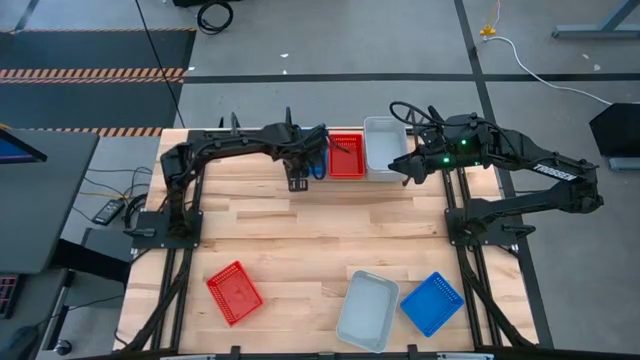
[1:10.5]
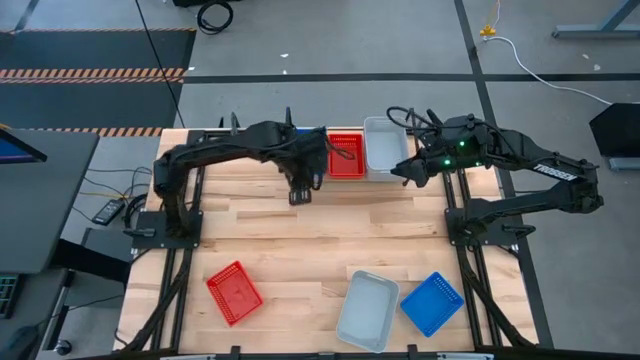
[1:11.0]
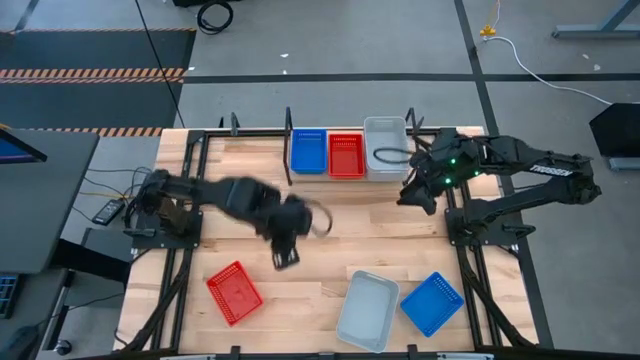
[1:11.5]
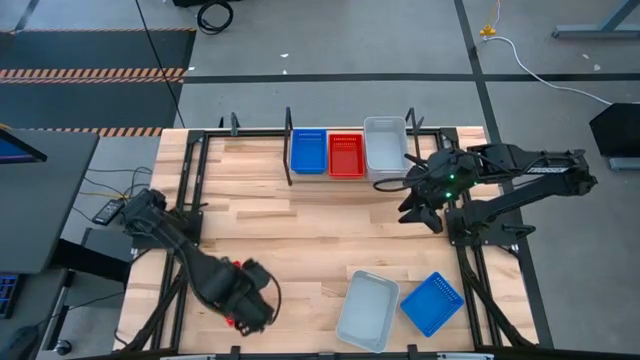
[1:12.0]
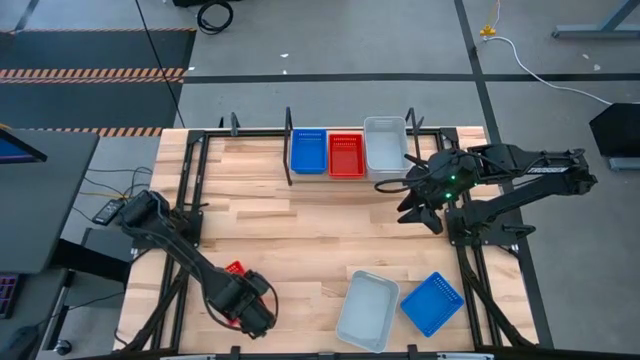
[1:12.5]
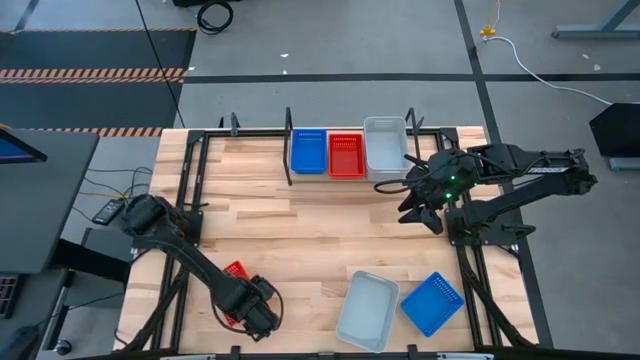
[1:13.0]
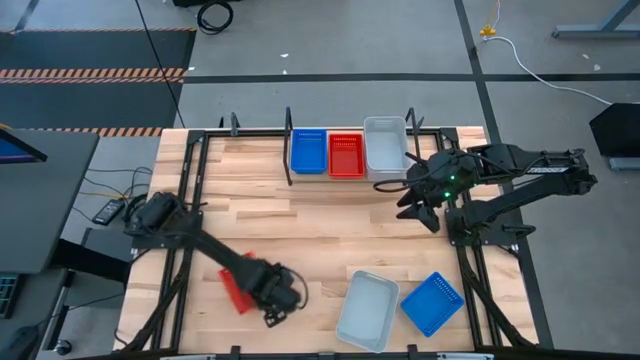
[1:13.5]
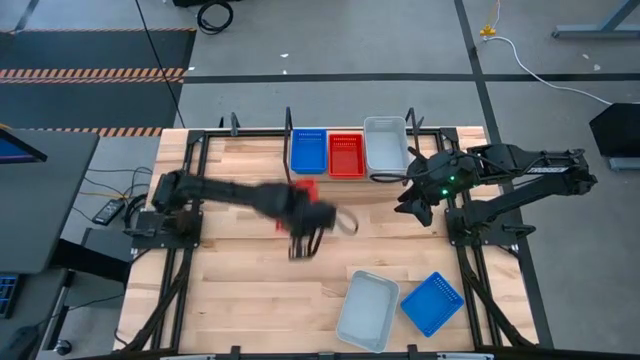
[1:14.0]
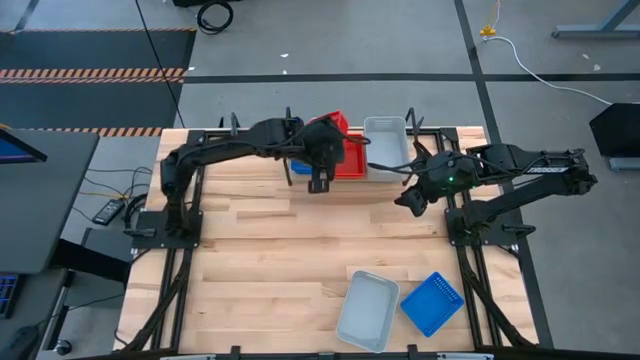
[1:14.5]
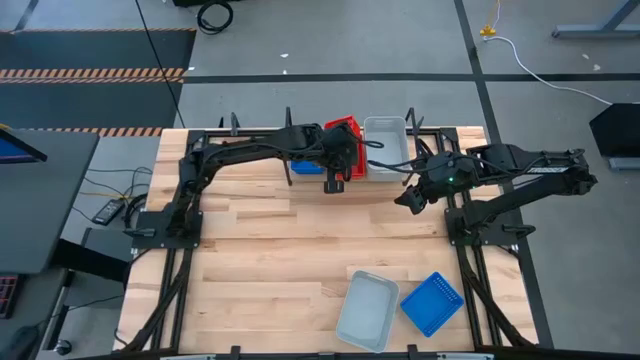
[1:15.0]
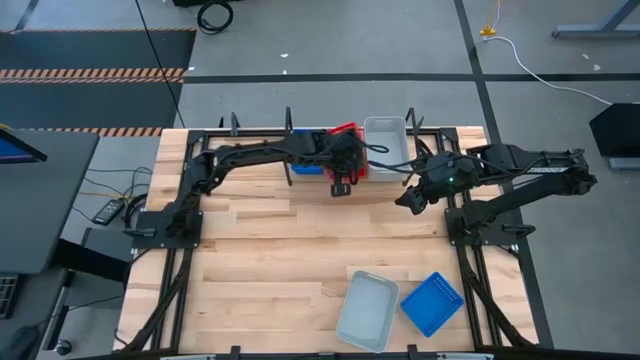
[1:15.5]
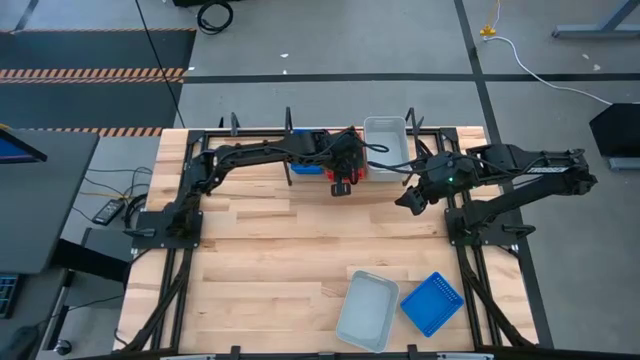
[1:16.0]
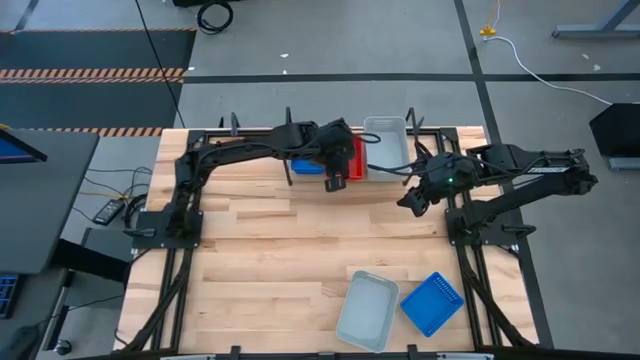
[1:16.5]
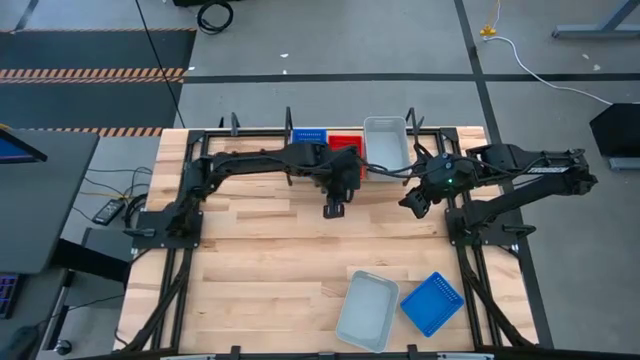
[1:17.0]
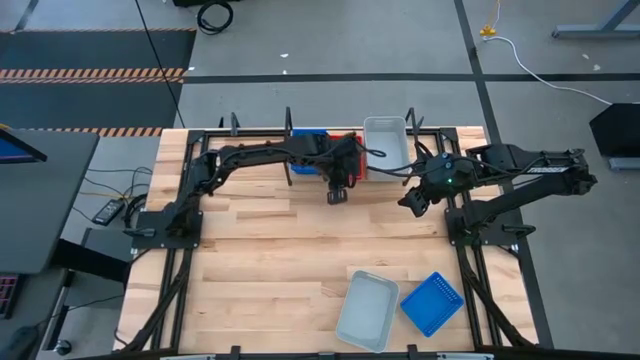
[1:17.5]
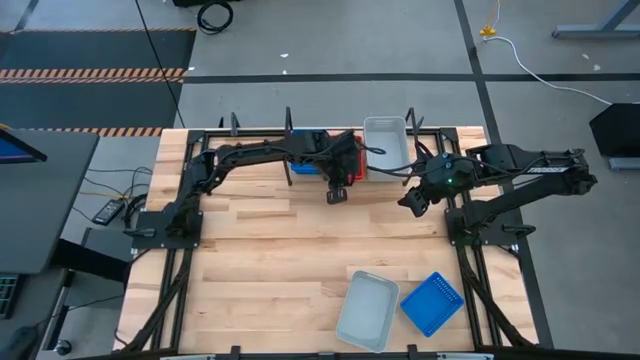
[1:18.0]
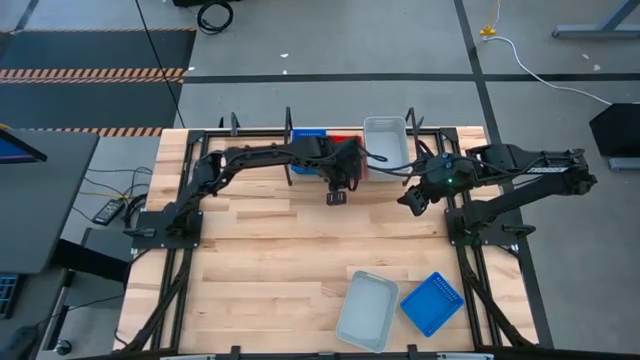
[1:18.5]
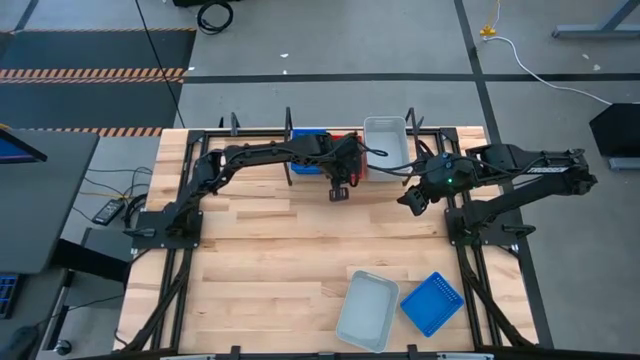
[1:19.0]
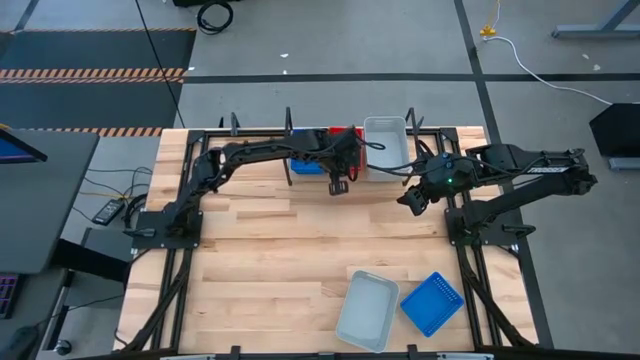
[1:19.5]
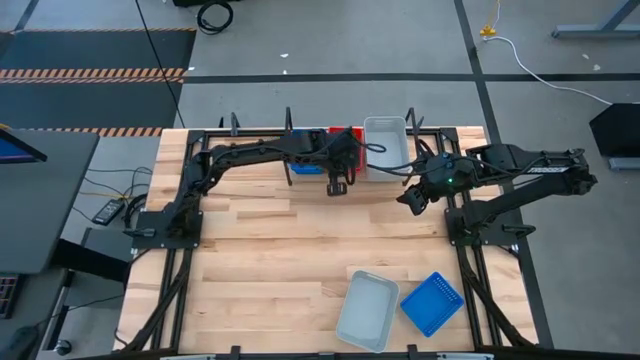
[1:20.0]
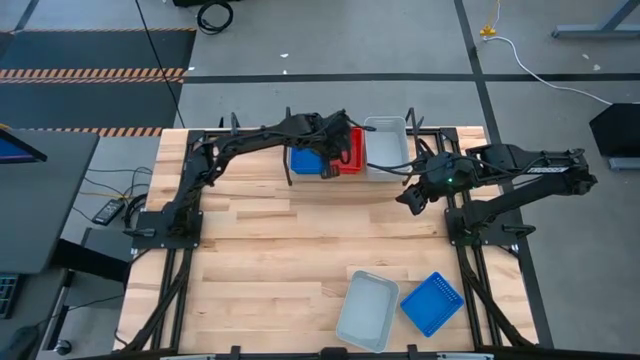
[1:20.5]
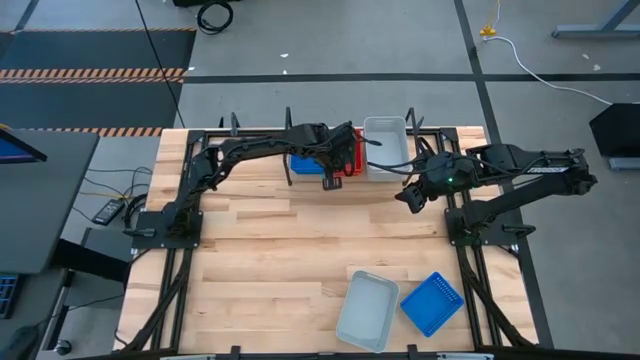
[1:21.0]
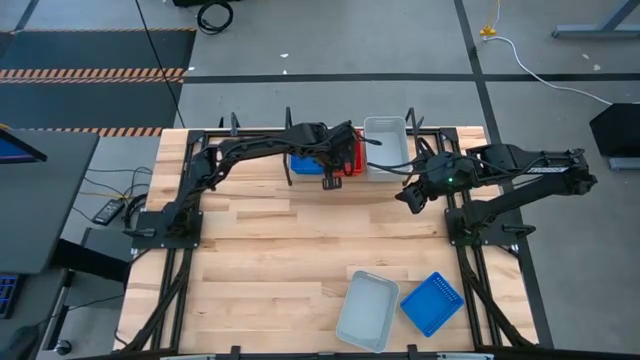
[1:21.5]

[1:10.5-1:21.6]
Task: Stack baskets on shelf by color
Stack the red bin on the red bin on the shelf

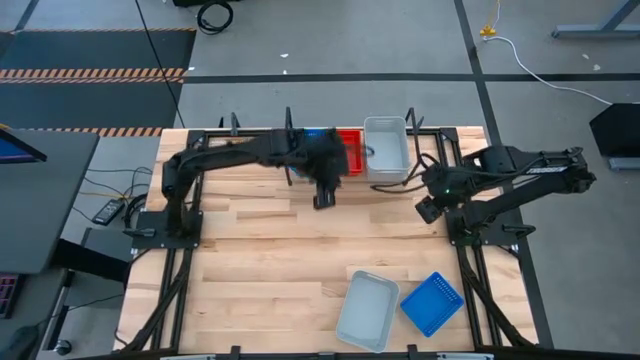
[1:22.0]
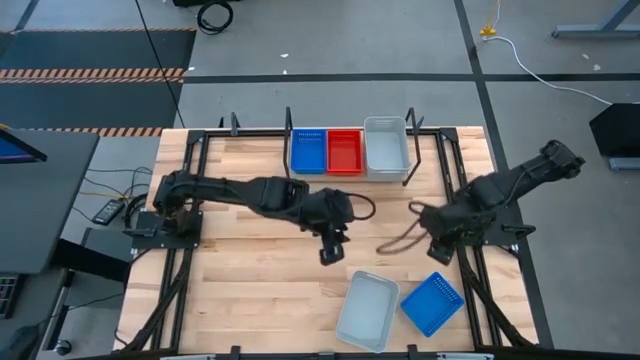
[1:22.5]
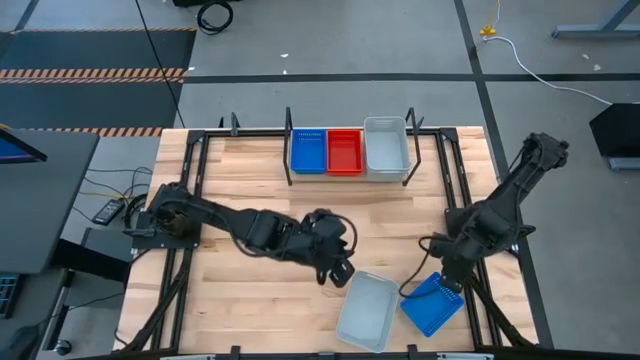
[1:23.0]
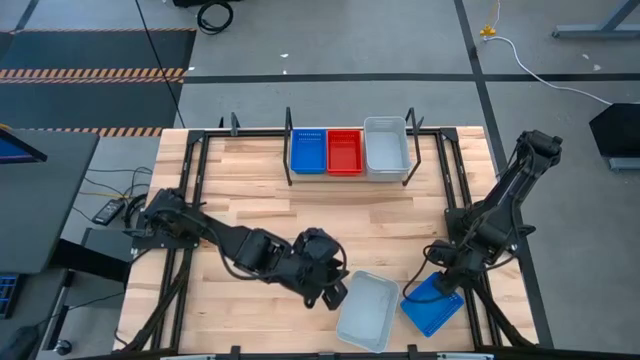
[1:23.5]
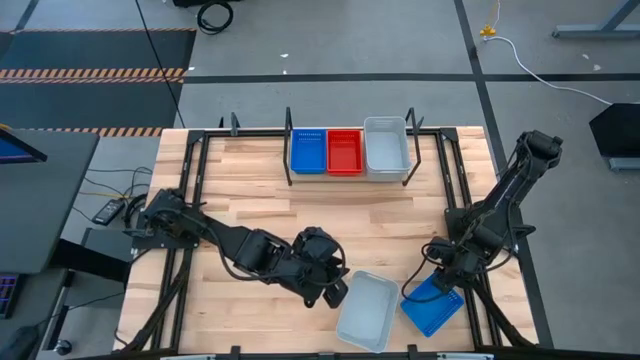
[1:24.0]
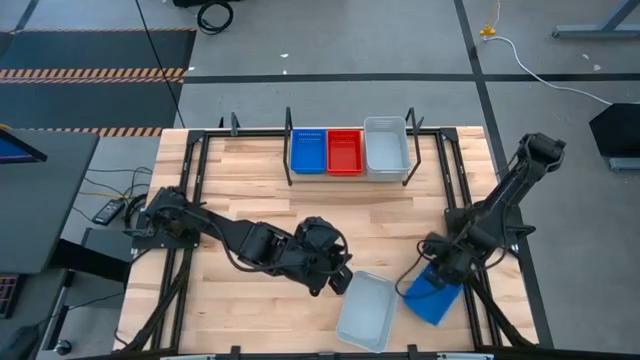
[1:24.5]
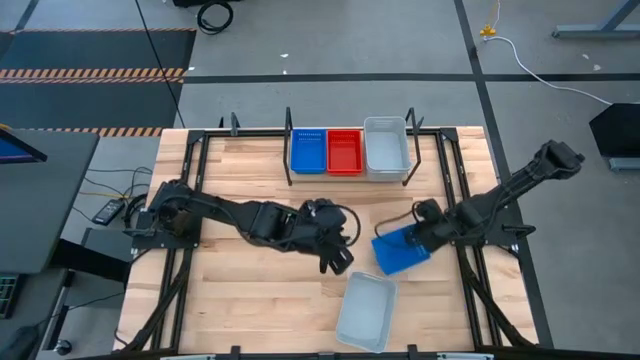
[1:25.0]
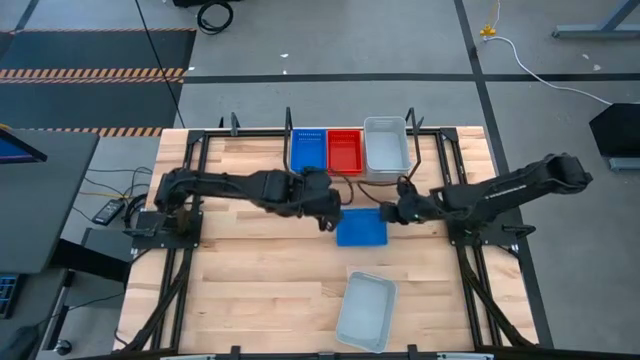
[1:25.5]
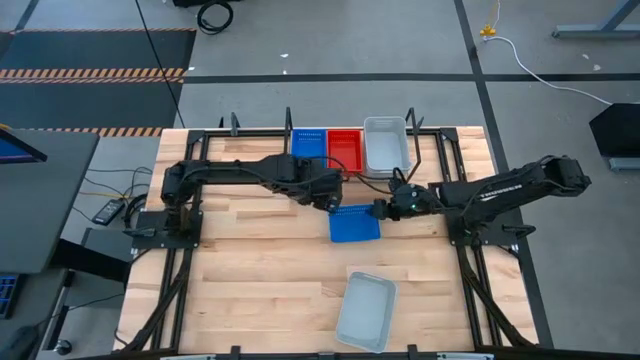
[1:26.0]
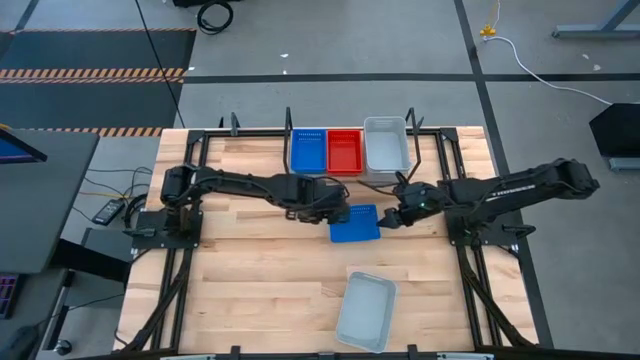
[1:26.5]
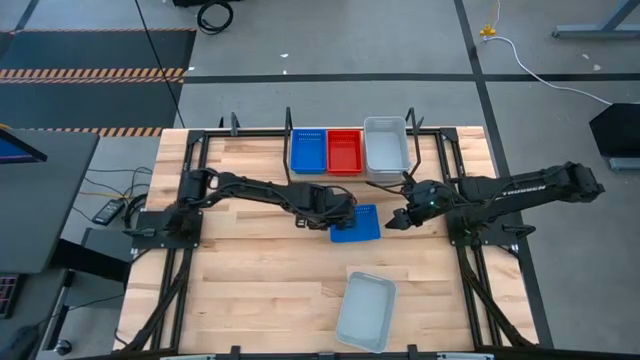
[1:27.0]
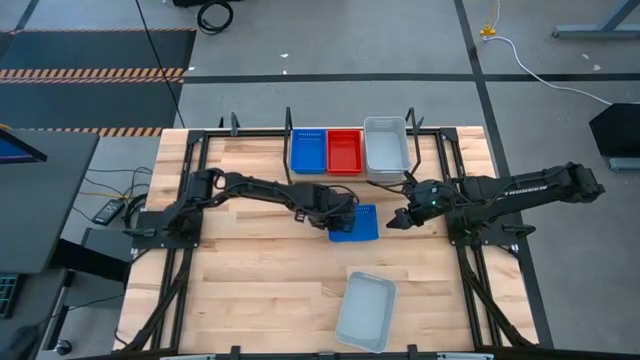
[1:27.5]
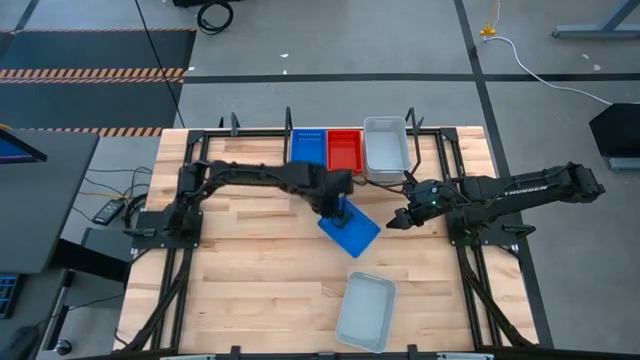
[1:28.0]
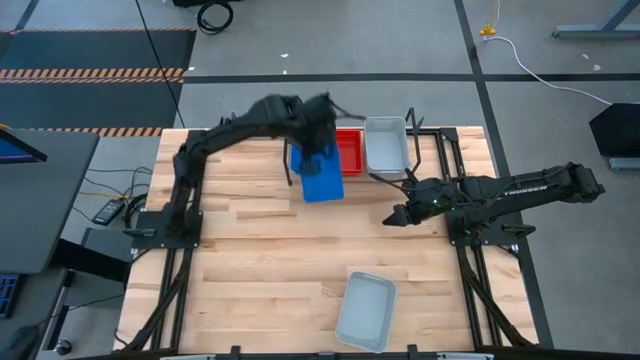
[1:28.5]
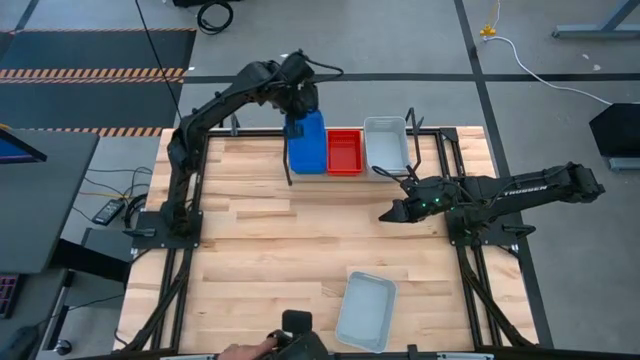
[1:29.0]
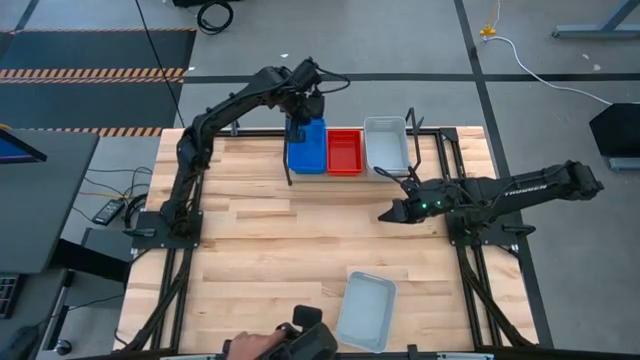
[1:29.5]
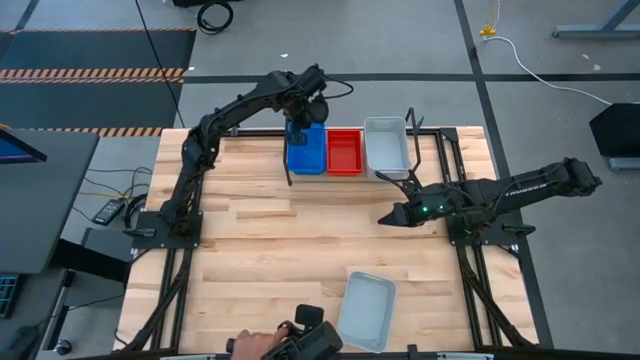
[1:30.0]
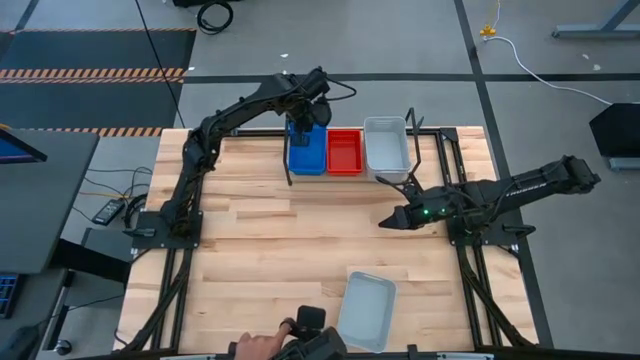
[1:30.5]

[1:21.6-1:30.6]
Stack the blue bin on the blue bin on the shelf
